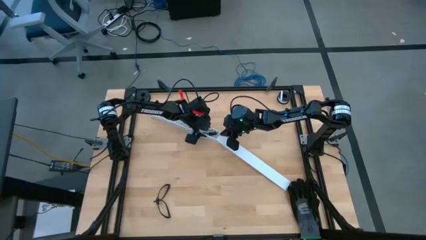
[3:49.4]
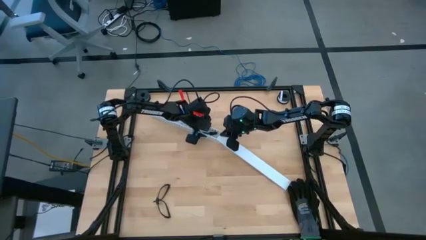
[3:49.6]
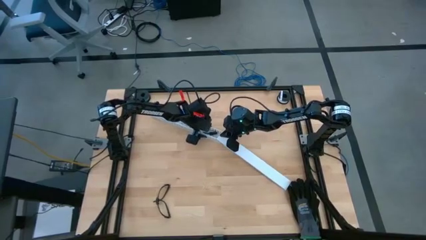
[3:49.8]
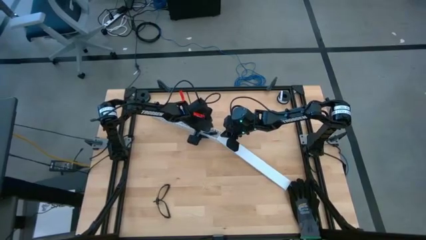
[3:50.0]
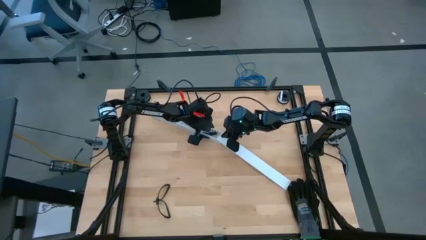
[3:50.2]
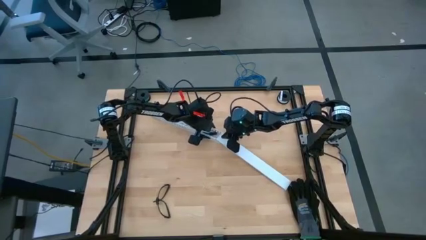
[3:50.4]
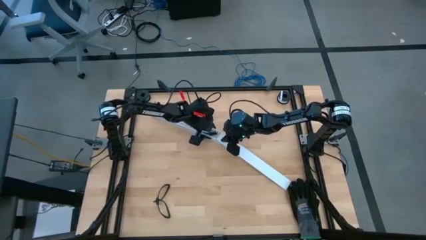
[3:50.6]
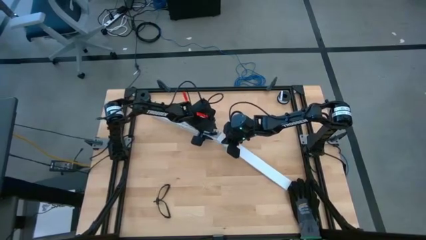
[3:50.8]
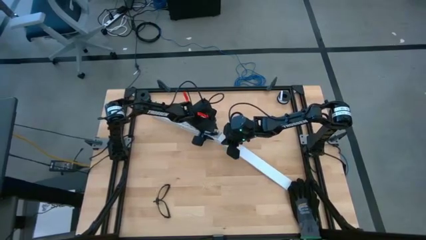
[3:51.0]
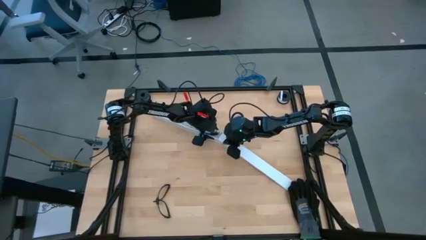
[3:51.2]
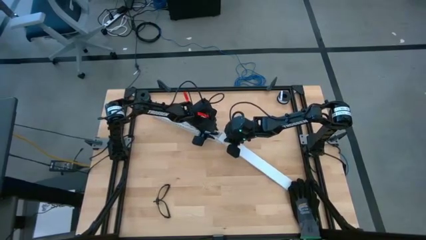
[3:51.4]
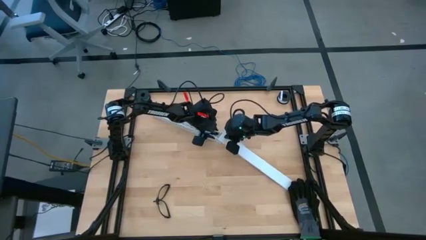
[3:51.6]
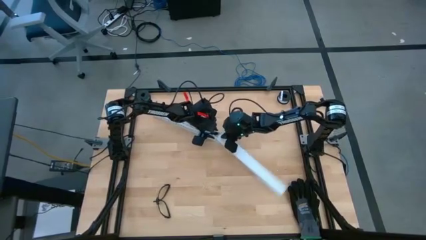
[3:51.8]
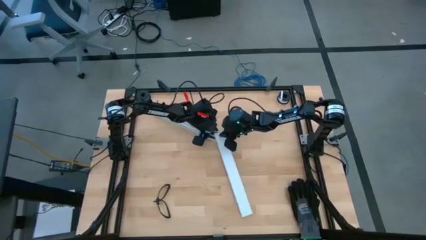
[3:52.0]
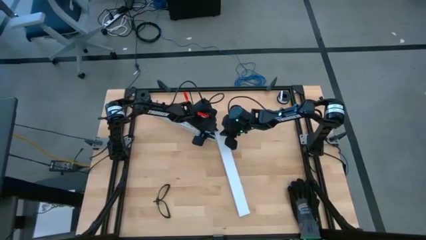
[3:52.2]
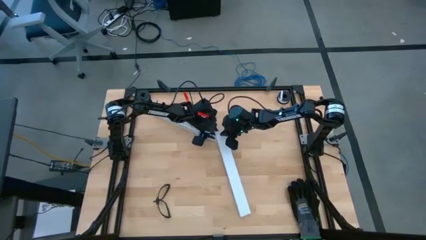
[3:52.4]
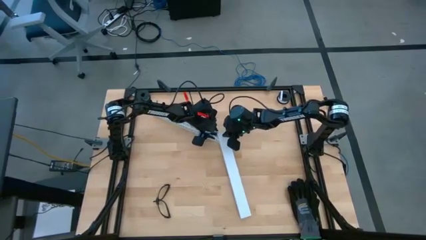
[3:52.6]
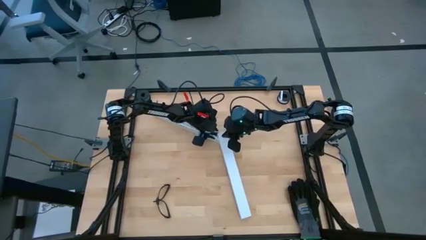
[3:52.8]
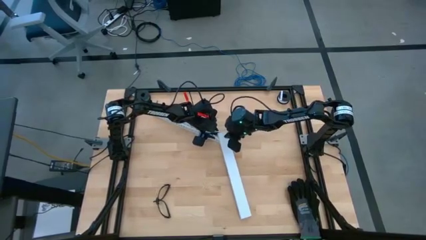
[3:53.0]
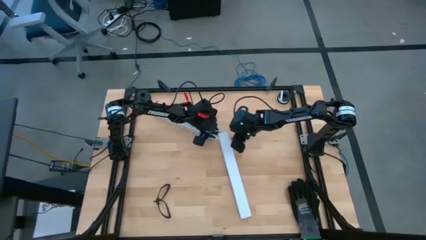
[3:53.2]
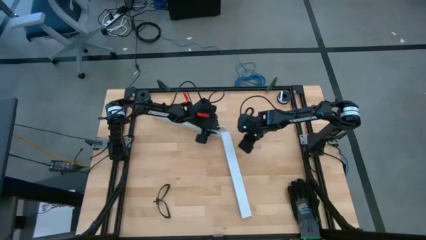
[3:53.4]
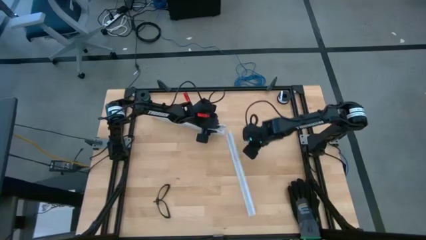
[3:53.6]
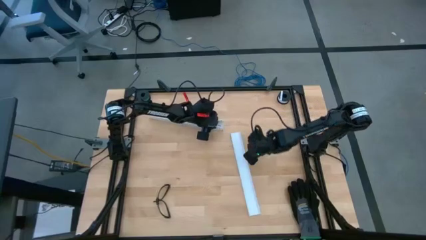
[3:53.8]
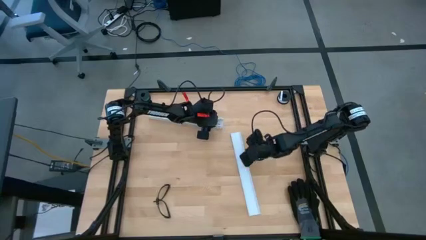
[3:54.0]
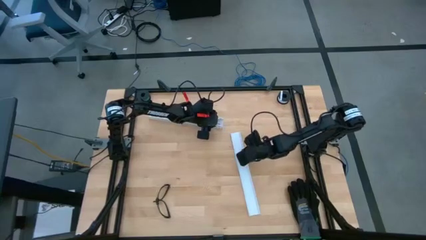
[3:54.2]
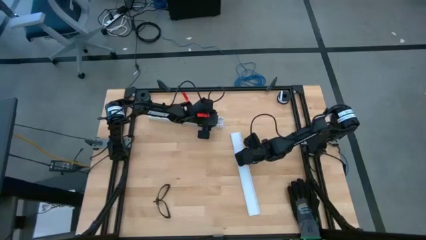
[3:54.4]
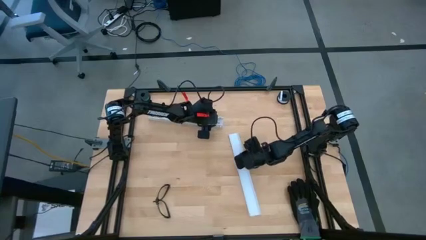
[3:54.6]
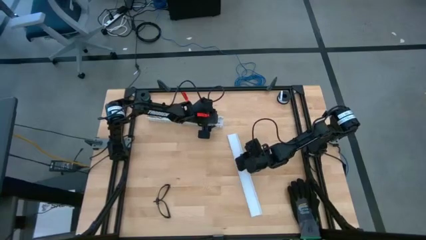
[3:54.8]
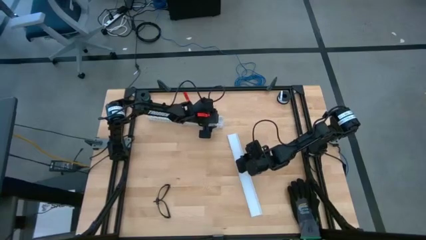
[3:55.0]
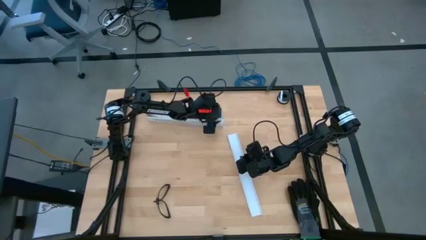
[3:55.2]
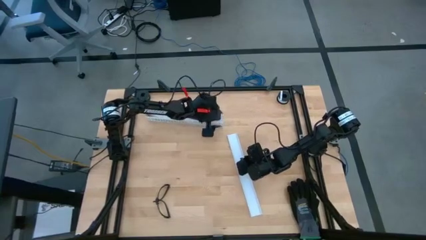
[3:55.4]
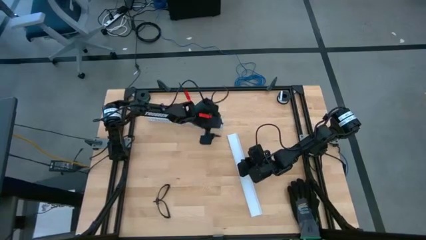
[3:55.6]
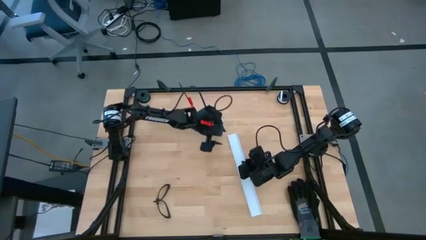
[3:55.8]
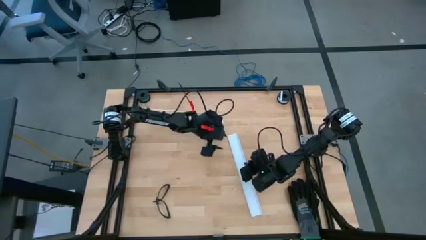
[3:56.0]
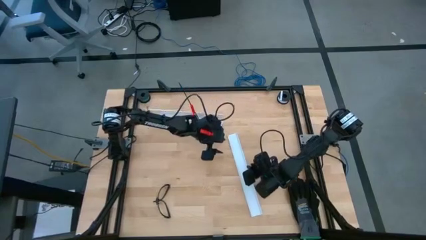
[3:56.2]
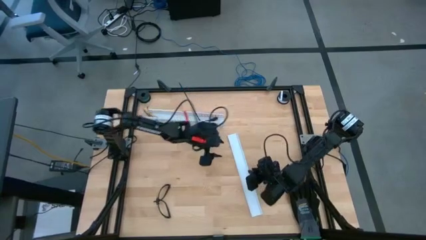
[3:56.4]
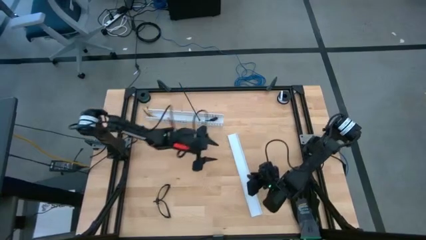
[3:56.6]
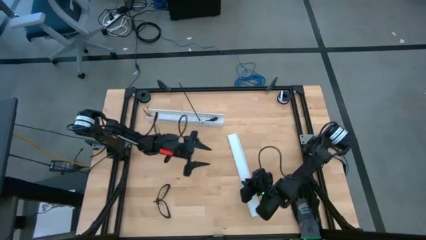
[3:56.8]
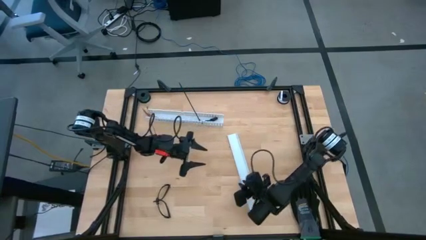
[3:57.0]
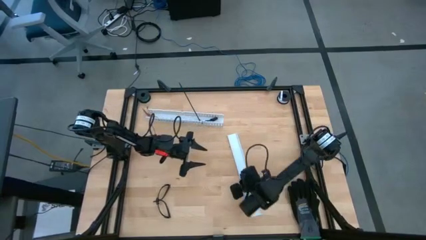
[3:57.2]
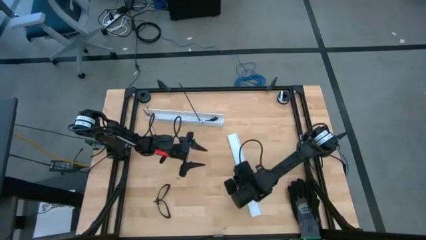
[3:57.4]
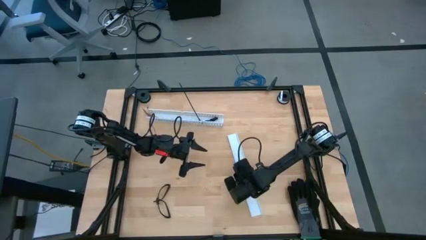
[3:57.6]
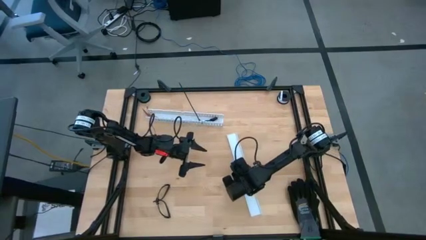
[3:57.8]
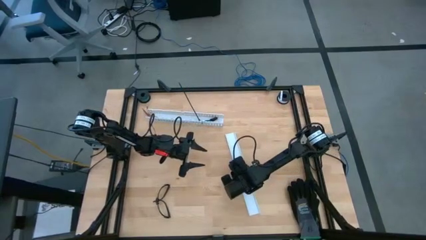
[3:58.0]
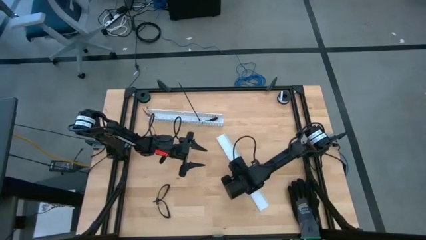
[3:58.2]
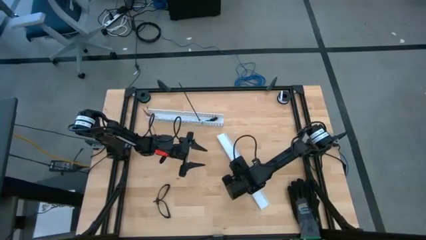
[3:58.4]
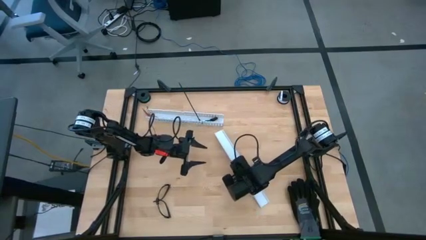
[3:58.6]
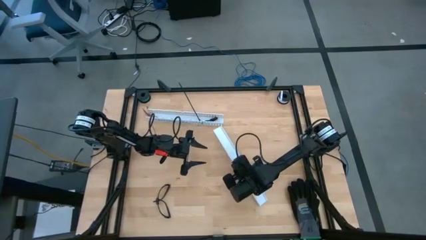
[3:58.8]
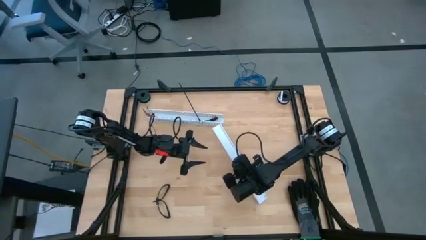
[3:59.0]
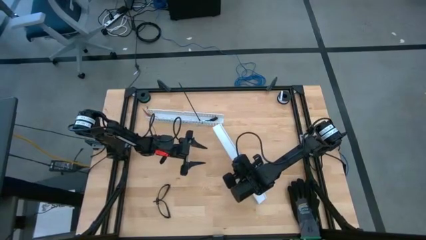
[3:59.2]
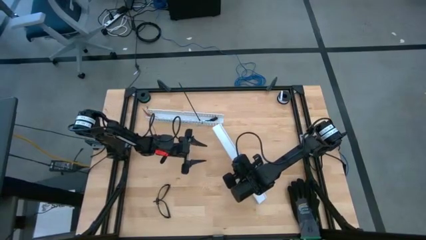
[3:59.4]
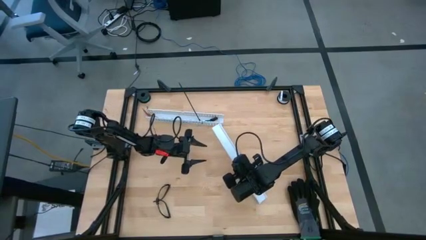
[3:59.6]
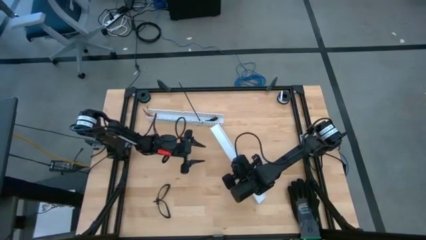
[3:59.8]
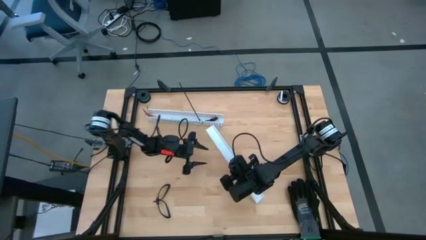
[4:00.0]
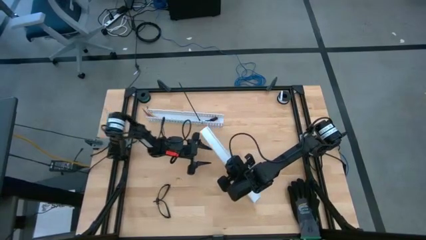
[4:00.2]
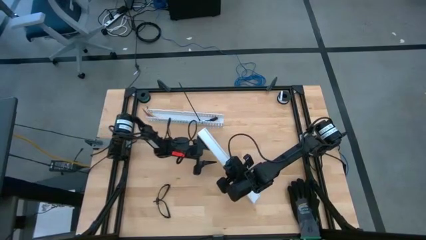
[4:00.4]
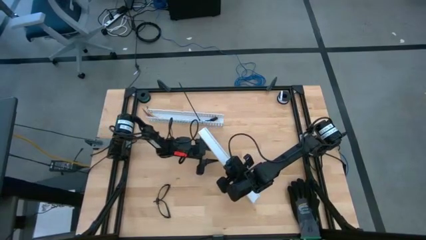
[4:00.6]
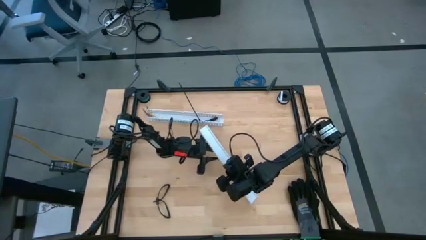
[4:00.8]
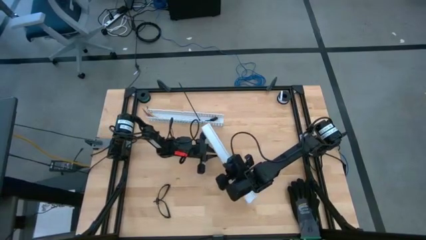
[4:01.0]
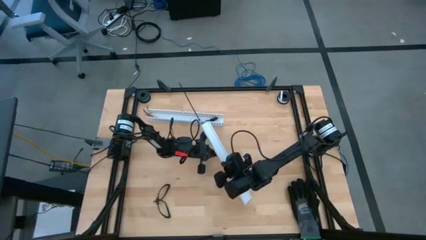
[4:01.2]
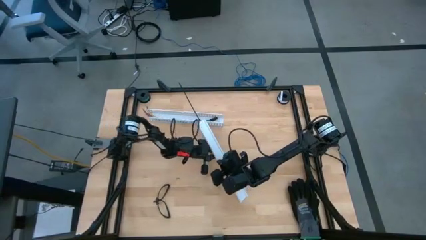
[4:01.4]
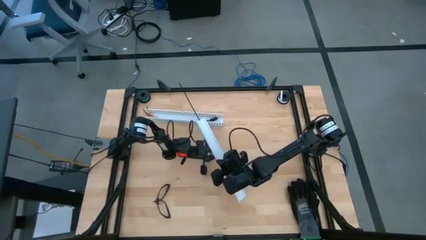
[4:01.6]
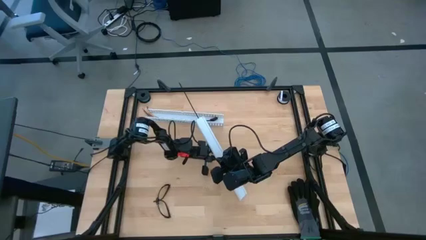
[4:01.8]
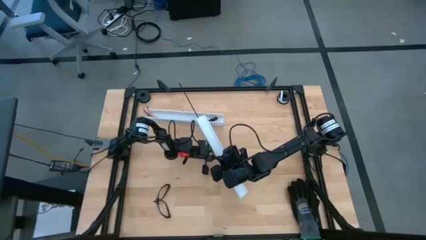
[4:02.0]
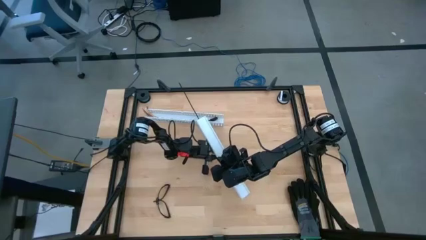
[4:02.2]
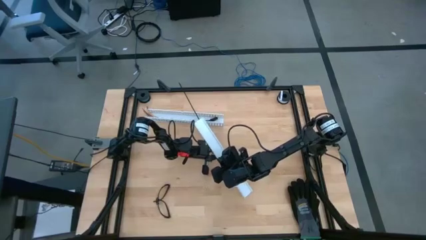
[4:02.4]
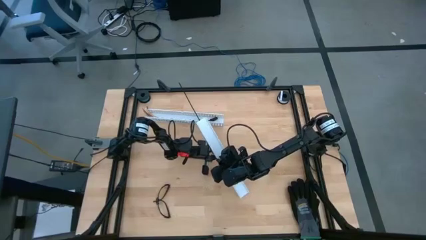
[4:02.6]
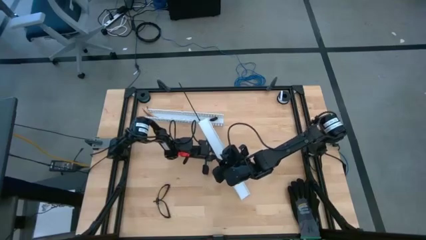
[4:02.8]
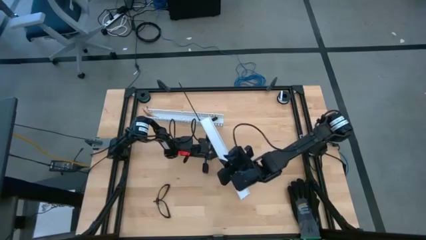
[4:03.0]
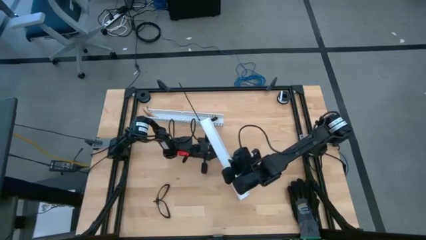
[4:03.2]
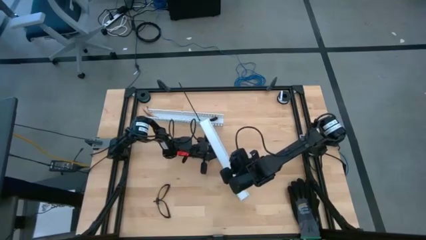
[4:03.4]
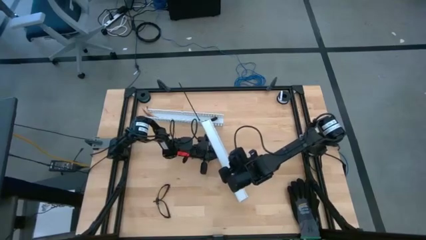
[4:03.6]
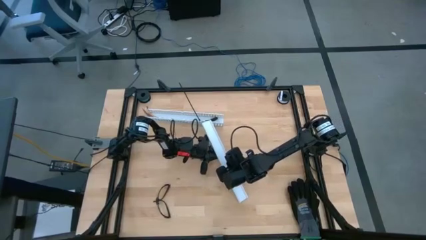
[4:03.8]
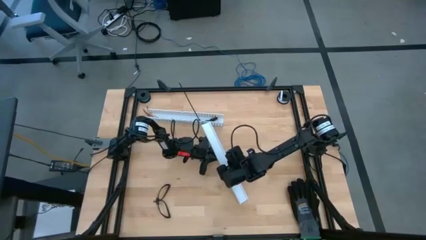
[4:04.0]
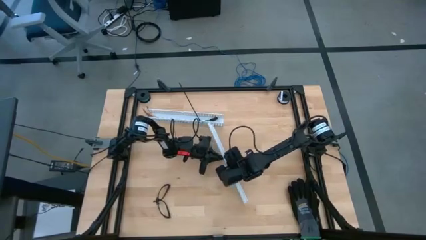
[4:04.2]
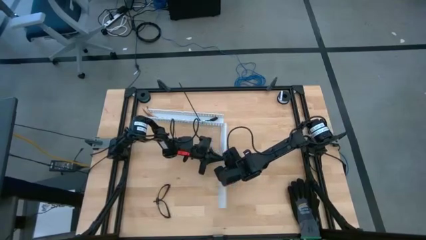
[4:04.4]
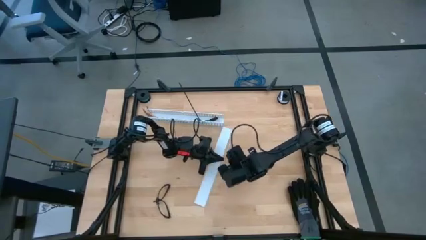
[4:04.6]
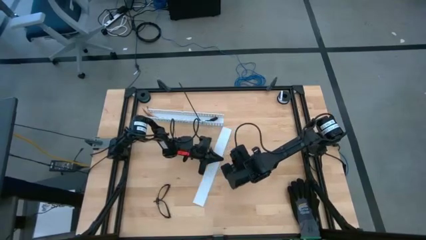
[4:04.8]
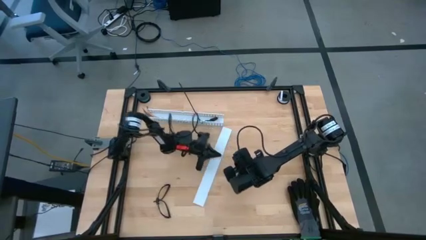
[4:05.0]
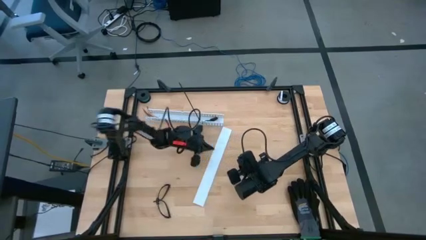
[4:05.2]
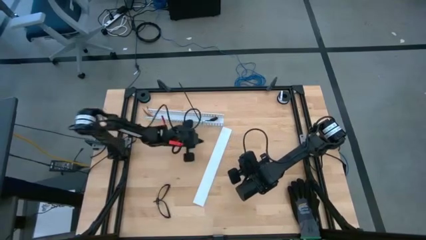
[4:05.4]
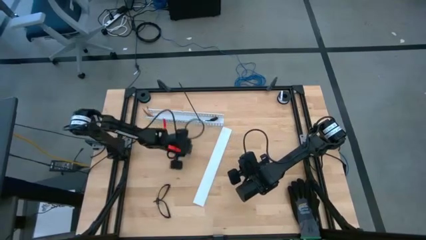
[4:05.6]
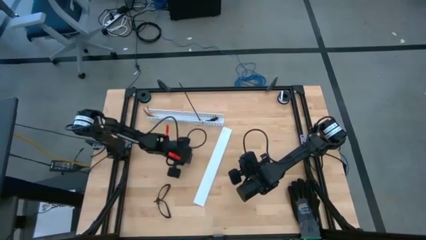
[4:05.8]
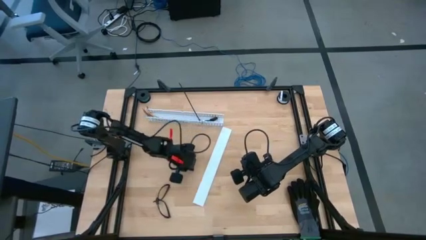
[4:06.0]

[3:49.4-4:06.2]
Task: Ziptie cables
Close the white cable duct lid
